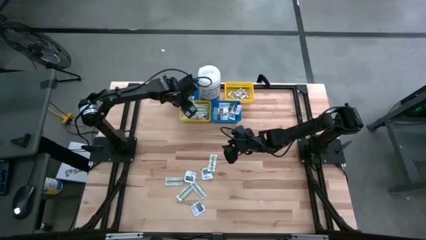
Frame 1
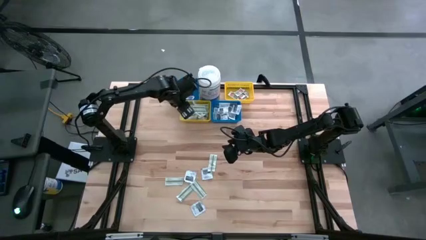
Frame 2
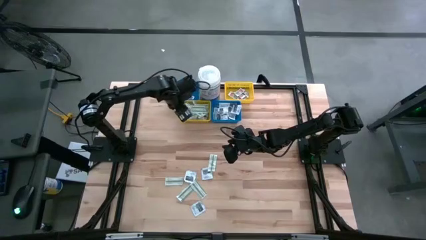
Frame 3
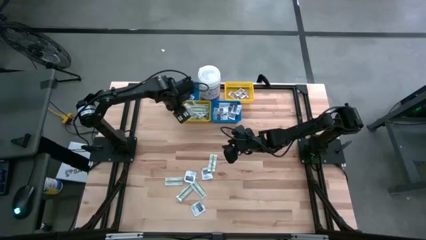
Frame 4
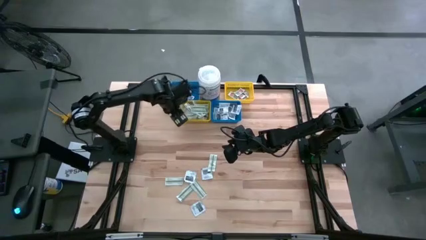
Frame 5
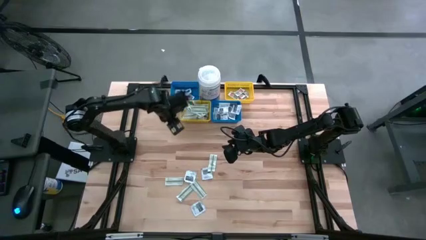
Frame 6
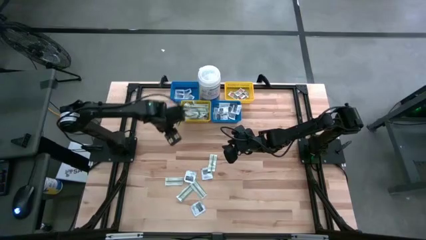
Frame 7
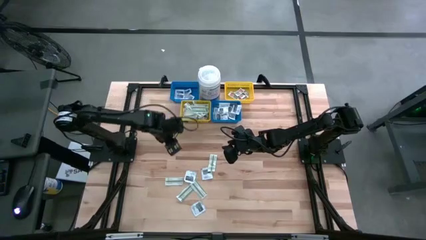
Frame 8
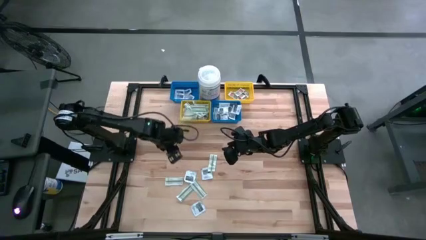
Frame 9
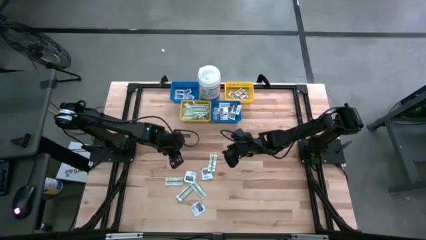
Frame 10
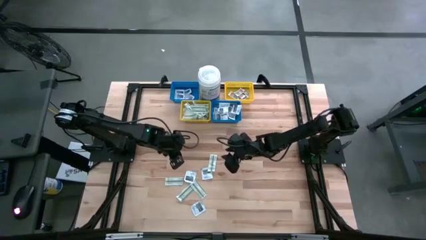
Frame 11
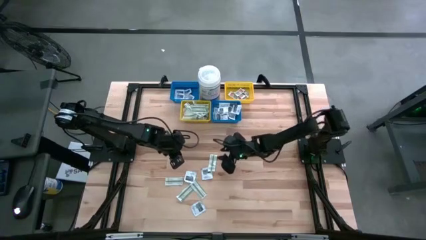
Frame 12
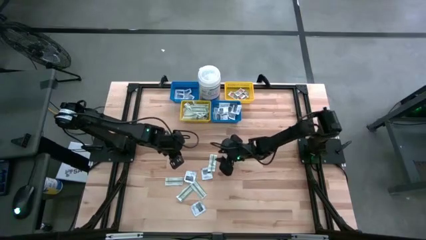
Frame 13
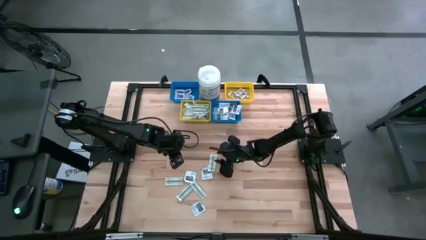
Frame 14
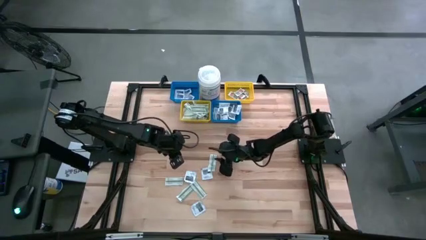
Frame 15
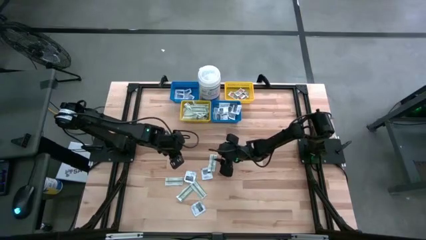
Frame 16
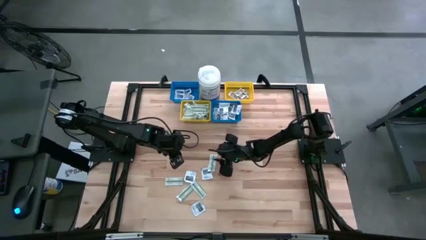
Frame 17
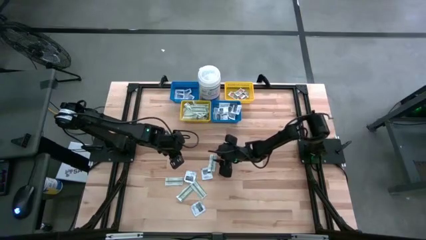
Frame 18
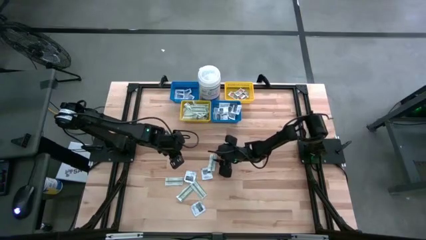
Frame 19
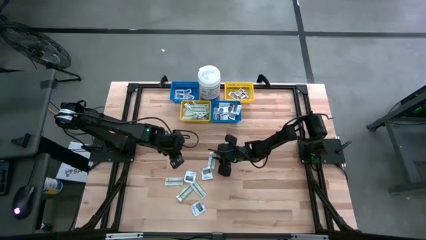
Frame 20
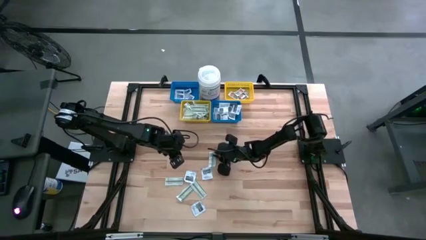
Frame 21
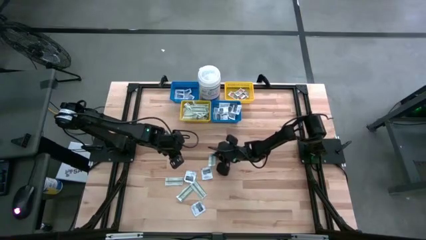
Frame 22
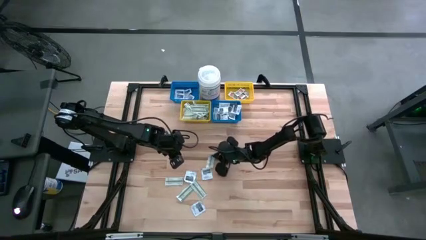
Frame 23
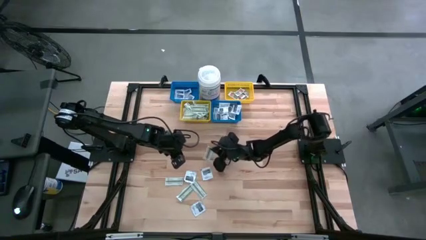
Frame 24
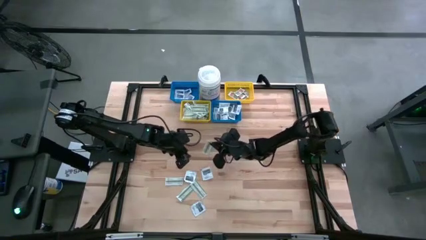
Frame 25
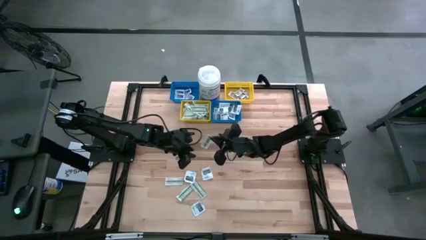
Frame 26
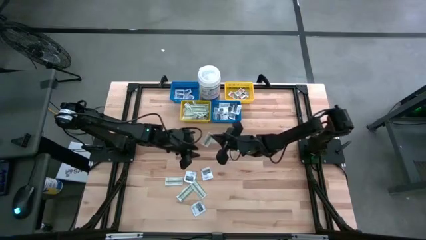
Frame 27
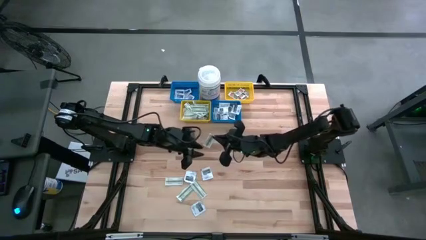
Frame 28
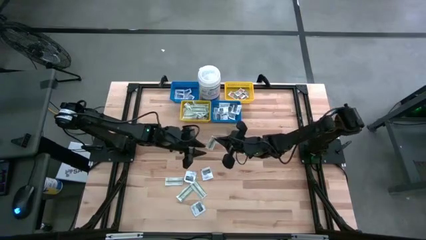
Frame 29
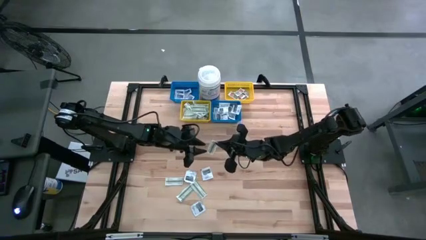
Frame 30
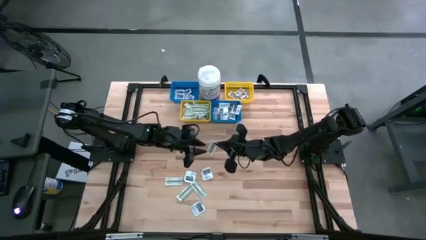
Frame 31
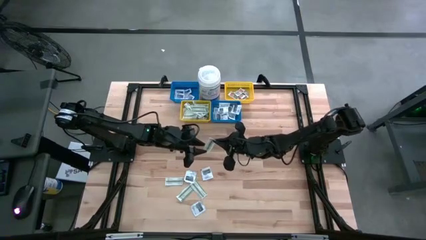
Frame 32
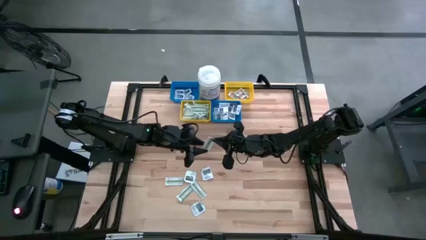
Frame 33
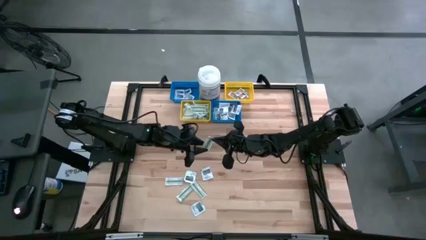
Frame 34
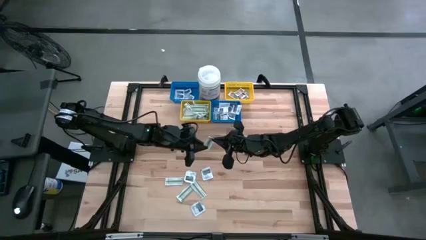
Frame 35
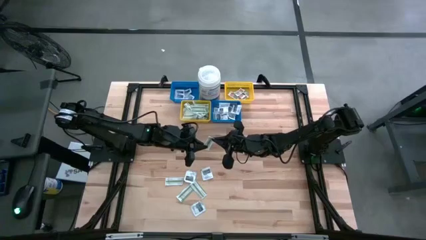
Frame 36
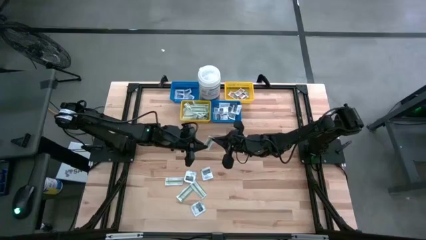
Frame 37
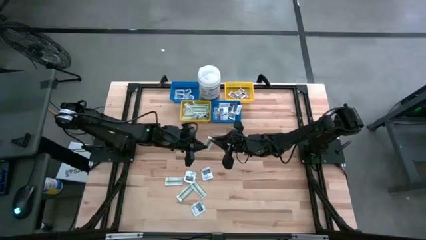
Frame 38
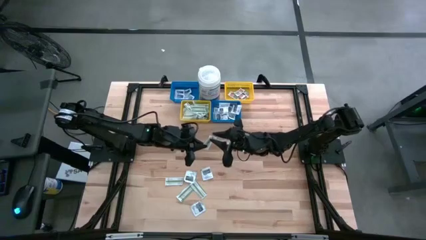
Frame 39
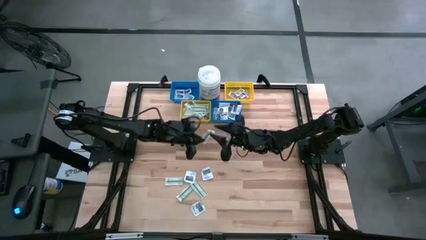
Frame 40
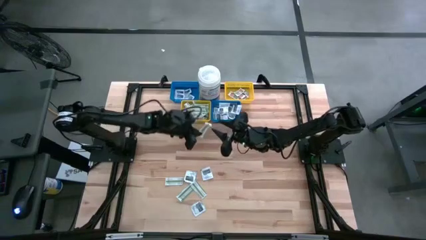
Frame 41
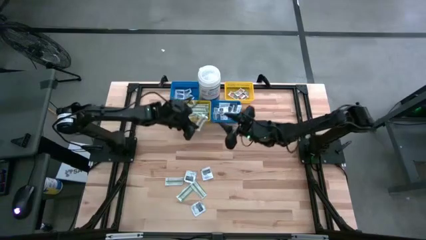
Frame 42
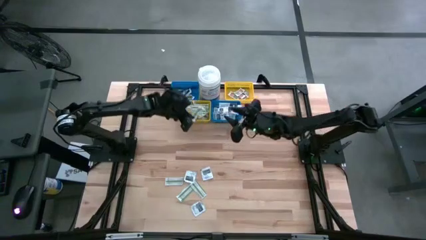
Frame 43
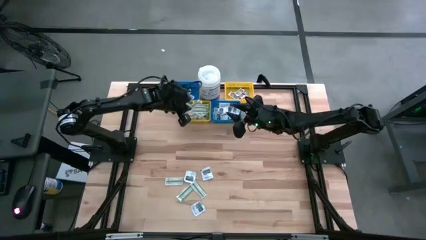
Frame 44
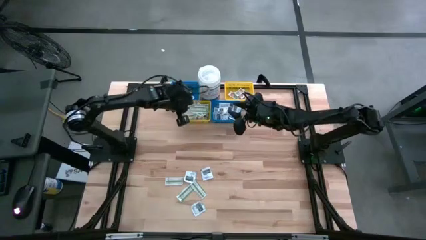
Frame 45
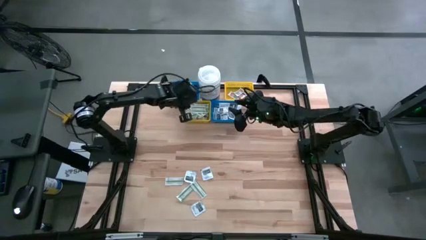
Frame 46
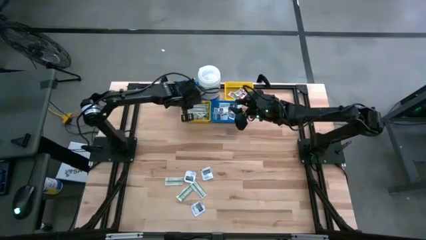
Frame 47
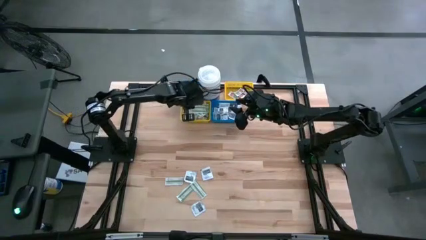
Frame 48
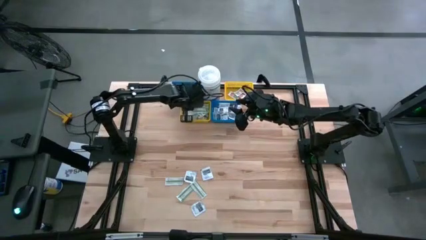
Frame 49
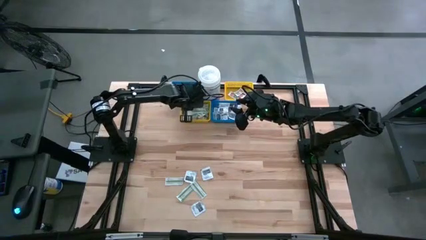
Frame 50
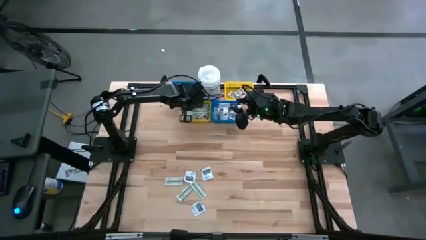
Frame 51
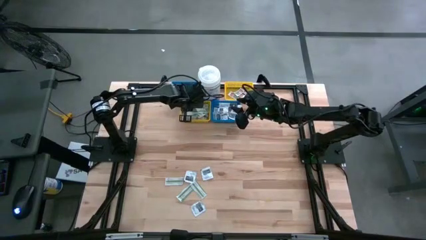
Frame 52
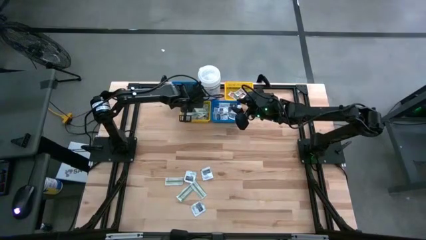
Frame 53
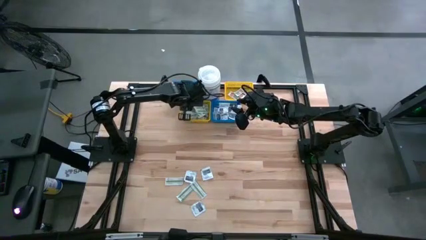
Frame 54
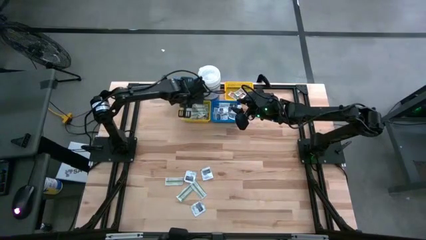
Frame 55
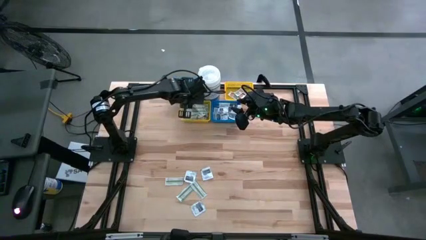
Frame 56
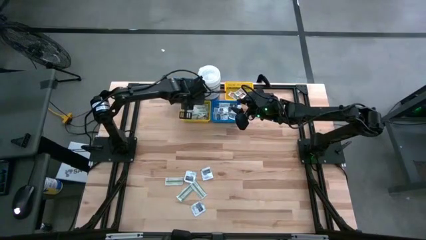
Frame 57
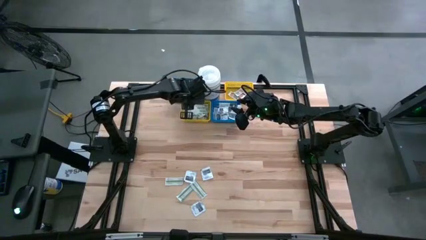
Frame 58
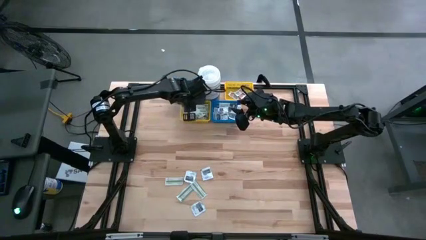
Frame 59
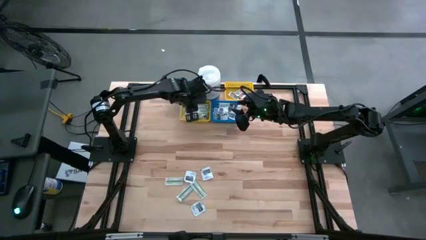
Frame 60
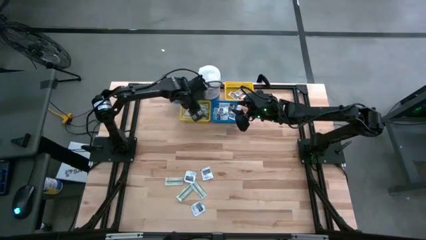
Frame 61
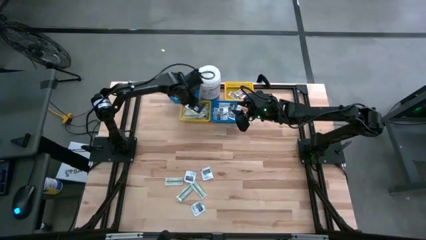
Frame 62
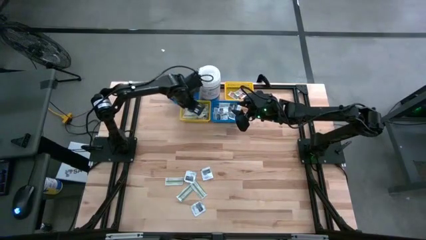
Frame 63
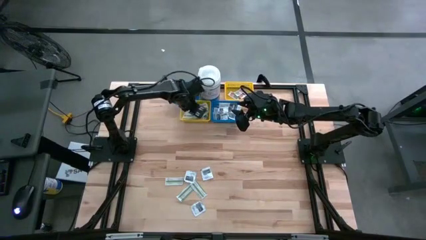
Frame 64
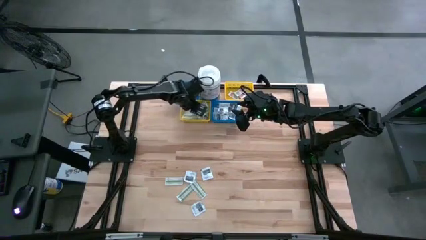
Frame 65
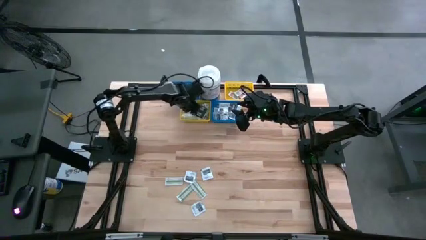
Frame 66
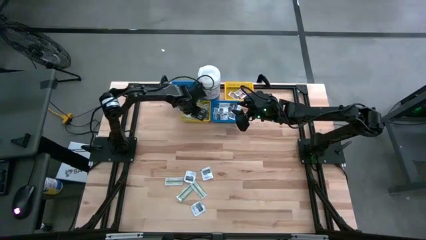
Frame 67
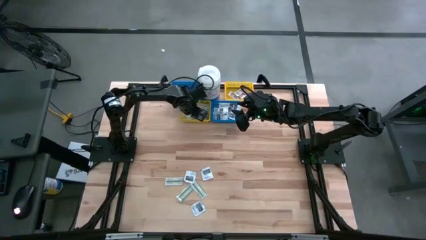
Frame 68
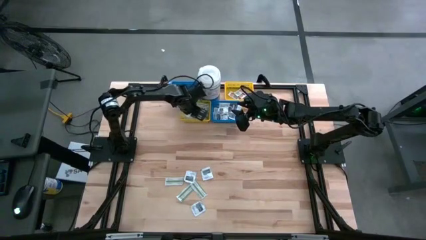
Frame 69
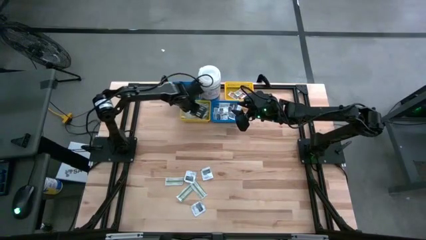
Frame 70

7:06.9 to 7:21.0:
Task: Pick & Place First Aid Supplies
Put the green bandage pad into the left yellow bin

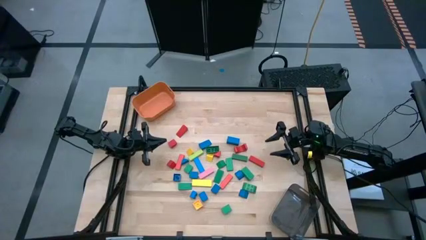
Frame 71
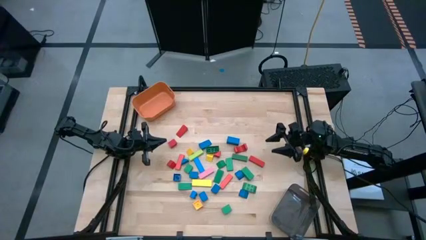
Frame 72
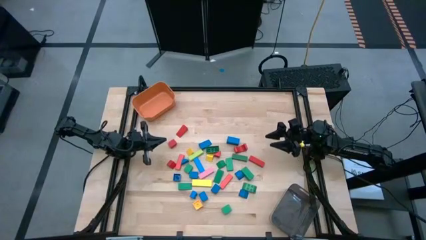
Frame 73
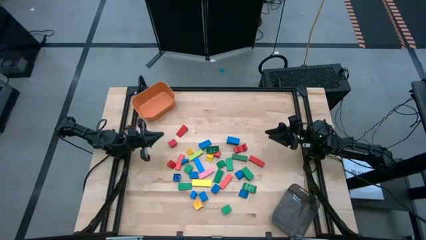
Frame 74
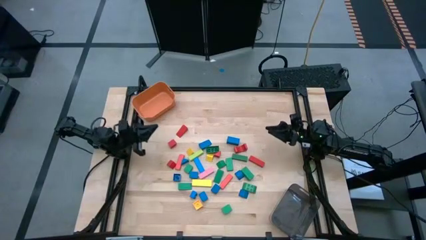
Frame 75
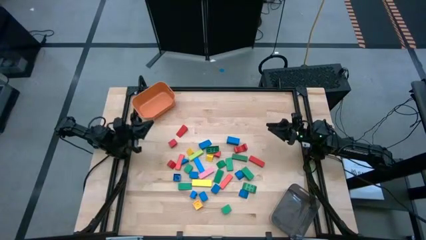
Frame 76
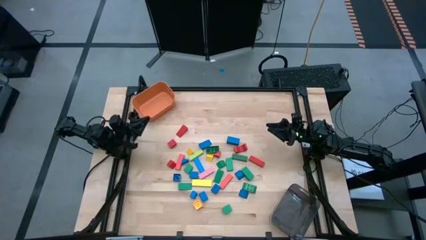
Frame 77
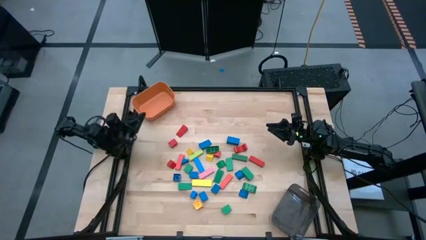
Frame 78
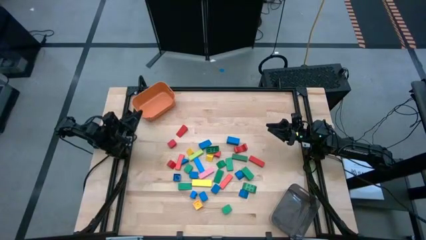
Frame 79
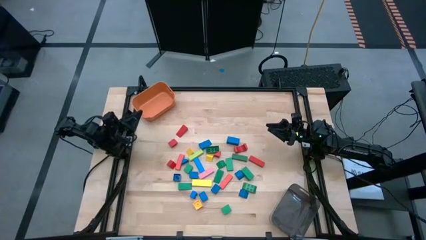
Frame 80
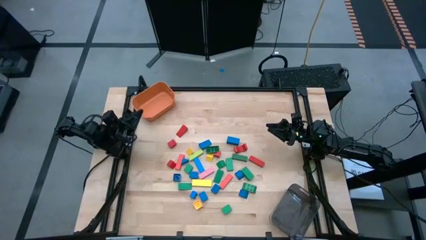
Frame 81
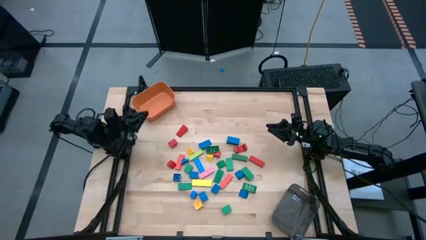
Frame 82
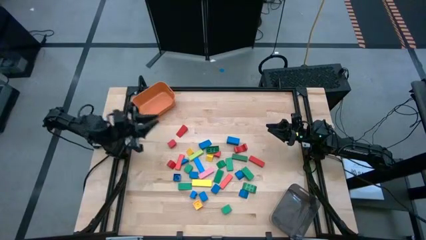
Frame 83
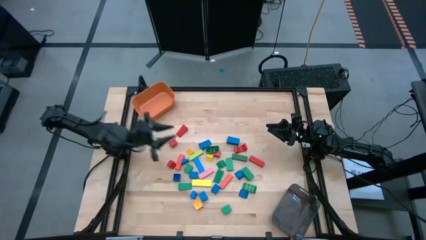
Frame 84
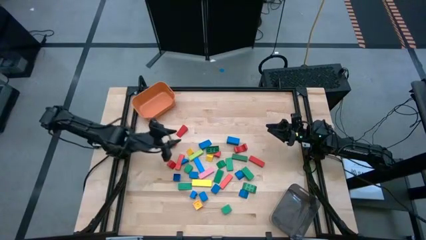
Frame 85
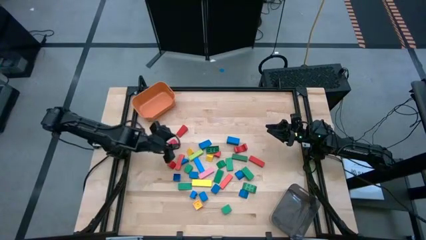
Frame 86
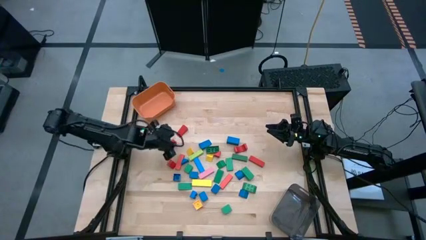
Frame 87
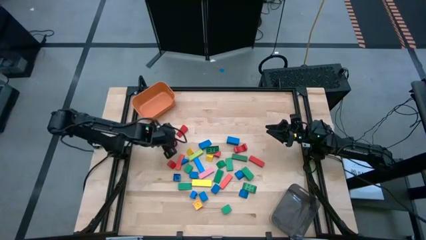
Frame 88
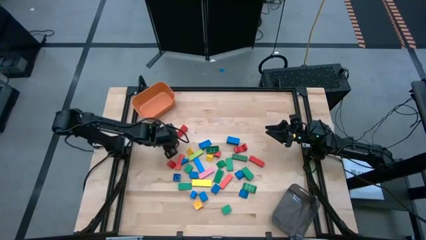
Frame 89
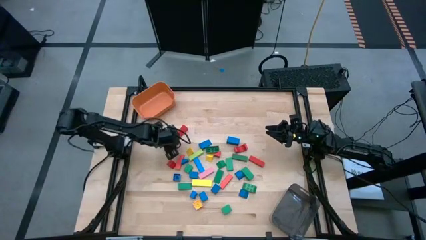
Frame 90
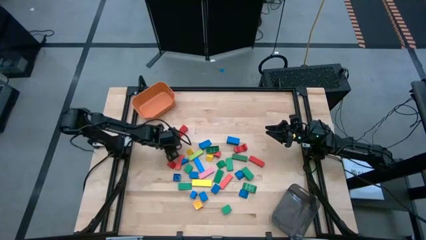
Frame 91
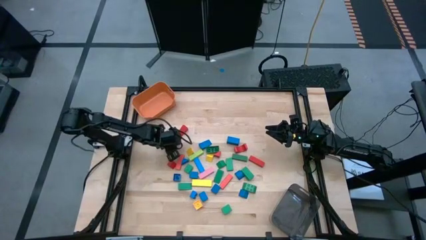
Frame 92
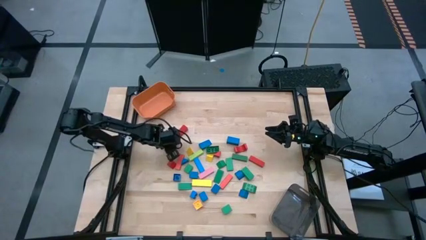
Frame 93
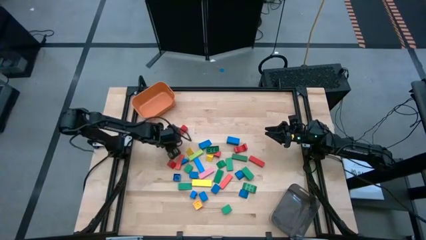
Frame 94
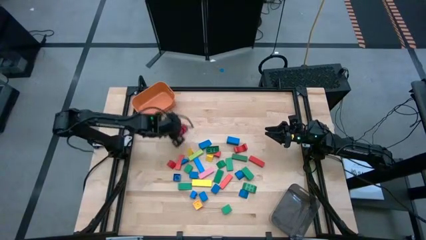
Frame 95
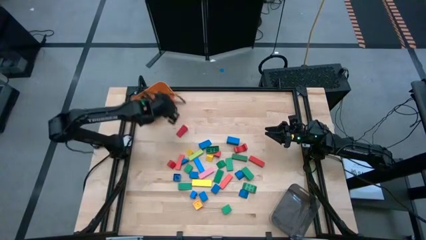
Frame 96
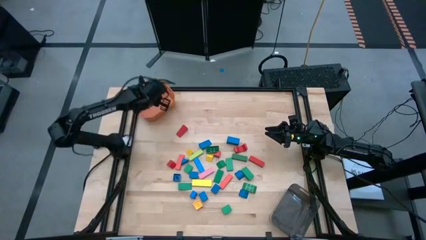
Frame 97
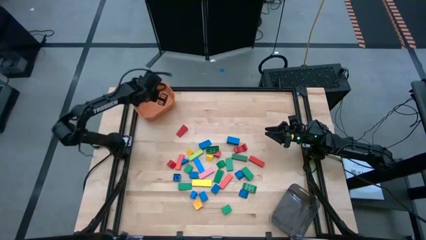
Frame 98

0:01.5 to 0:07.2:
Task: Sort blocks by size
Put the small red block into the orange bin
